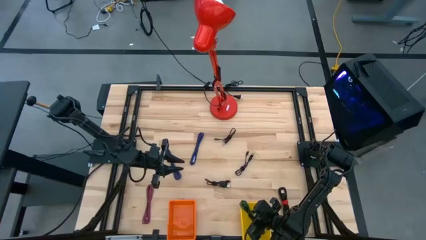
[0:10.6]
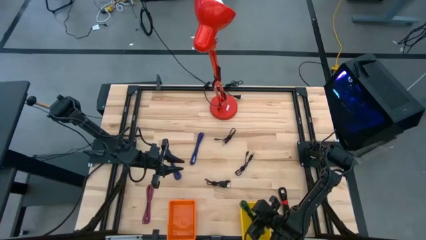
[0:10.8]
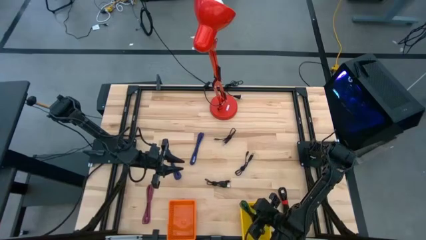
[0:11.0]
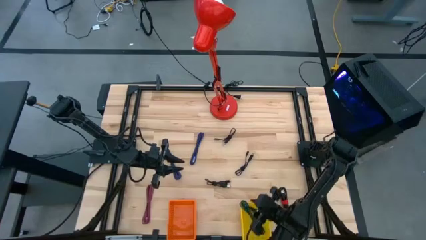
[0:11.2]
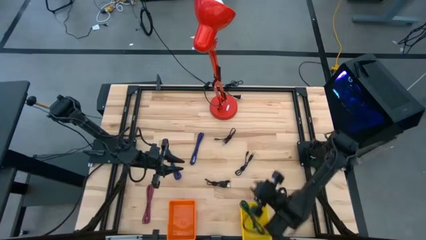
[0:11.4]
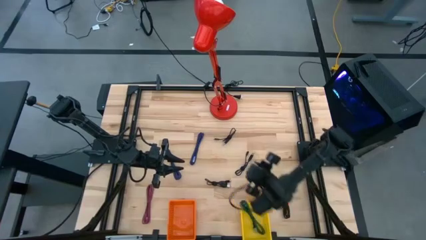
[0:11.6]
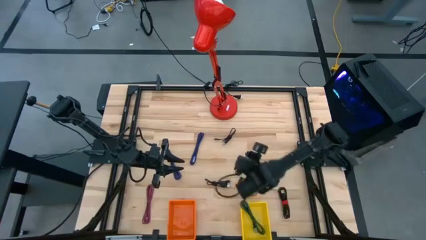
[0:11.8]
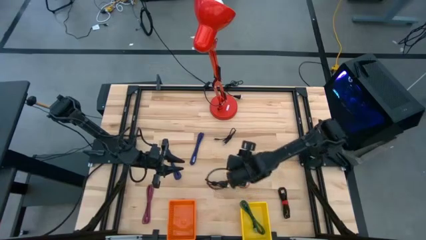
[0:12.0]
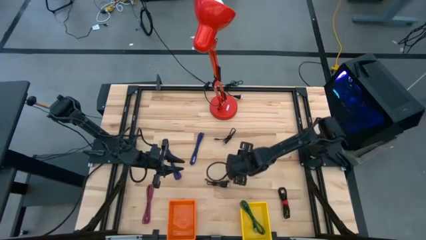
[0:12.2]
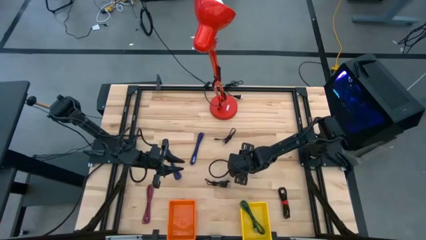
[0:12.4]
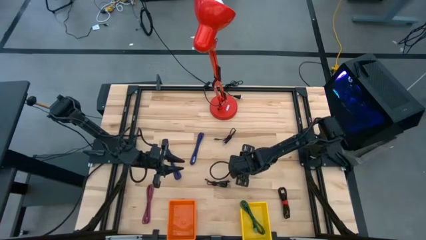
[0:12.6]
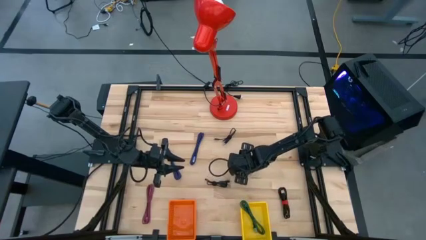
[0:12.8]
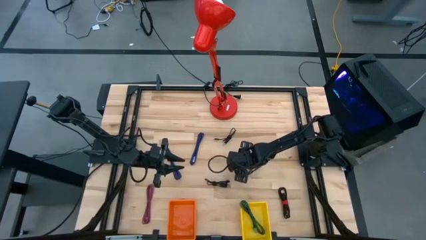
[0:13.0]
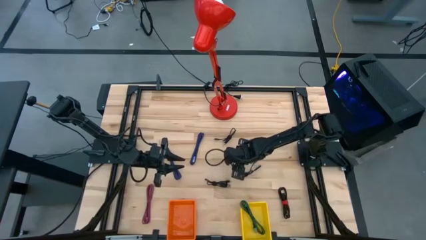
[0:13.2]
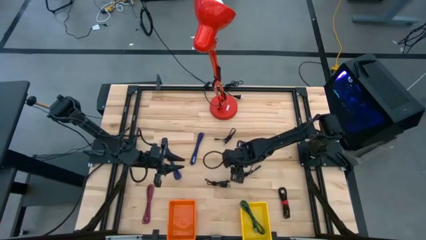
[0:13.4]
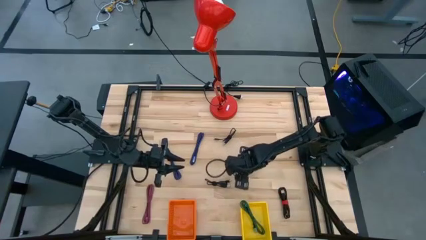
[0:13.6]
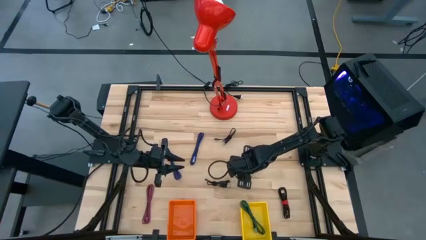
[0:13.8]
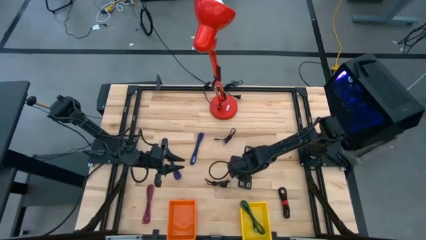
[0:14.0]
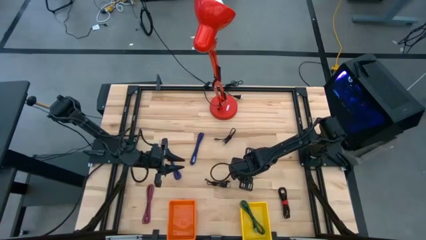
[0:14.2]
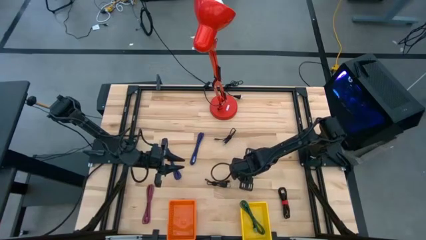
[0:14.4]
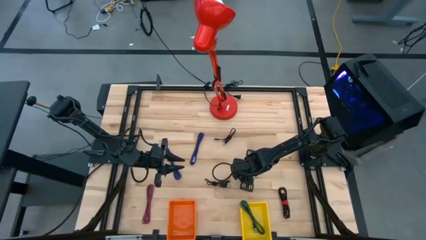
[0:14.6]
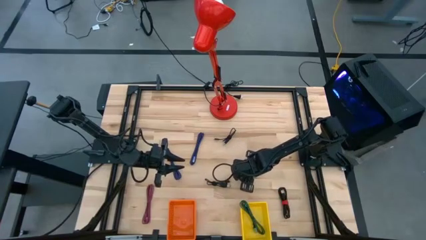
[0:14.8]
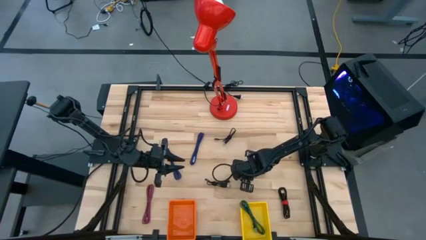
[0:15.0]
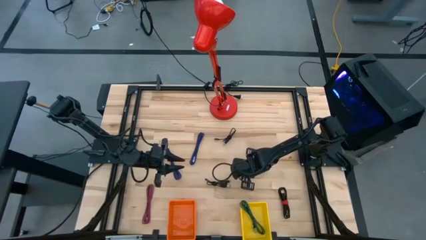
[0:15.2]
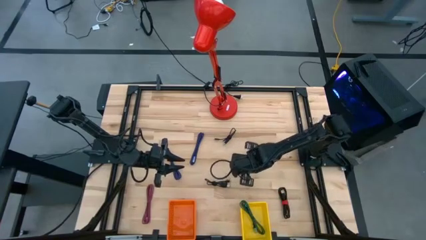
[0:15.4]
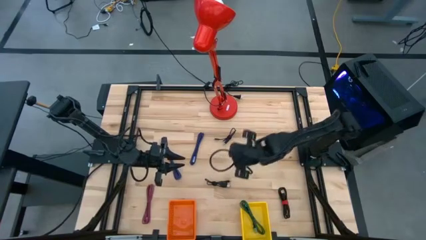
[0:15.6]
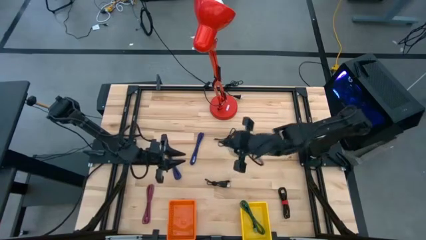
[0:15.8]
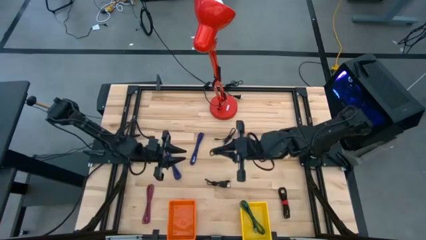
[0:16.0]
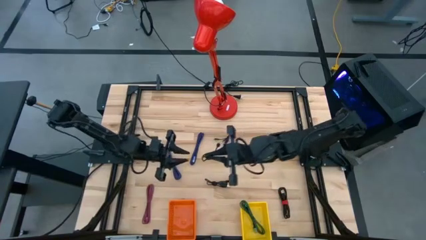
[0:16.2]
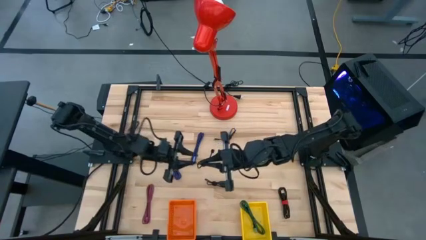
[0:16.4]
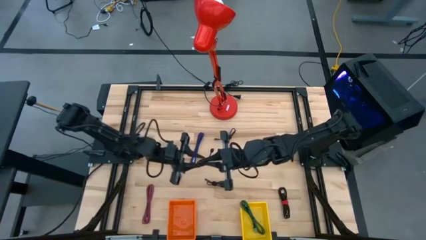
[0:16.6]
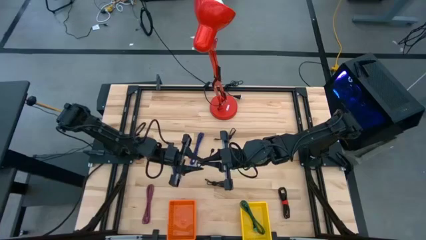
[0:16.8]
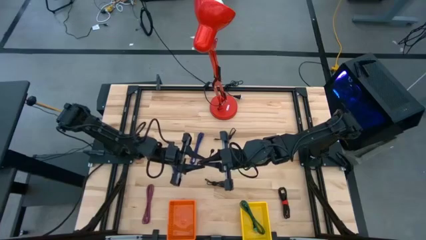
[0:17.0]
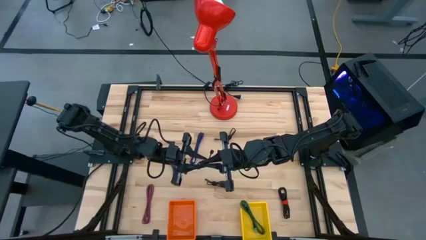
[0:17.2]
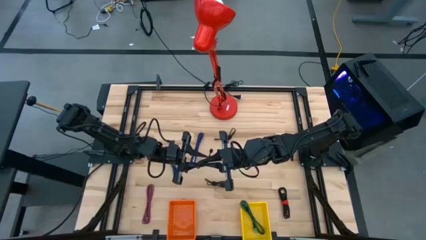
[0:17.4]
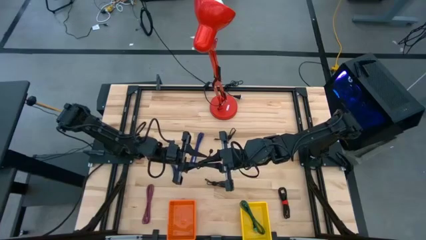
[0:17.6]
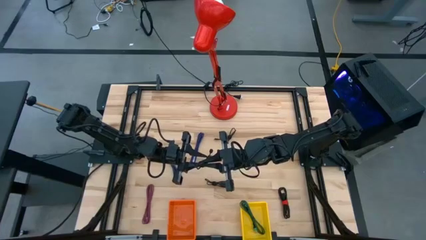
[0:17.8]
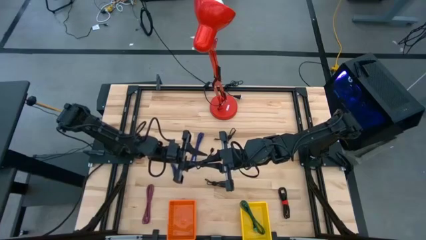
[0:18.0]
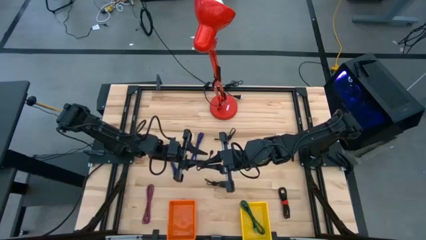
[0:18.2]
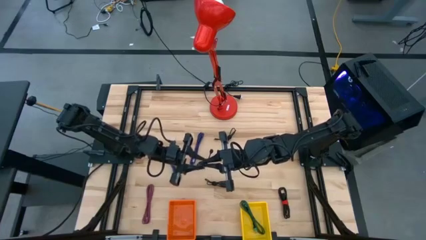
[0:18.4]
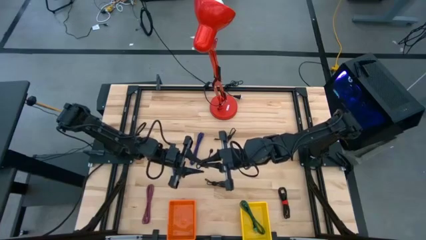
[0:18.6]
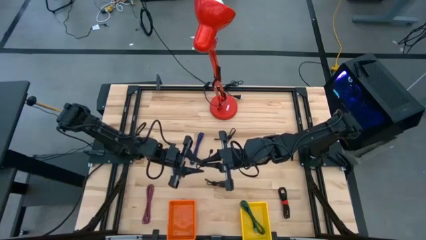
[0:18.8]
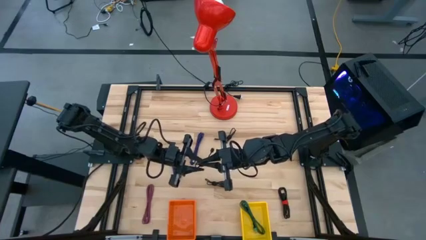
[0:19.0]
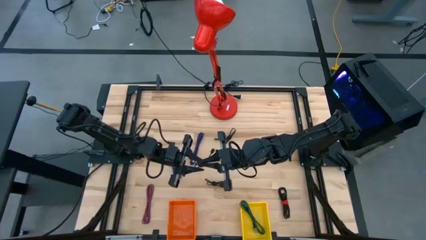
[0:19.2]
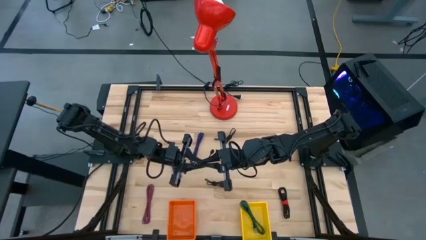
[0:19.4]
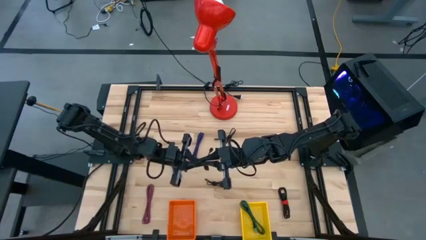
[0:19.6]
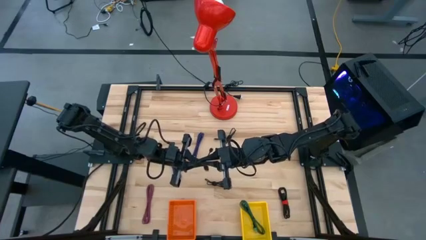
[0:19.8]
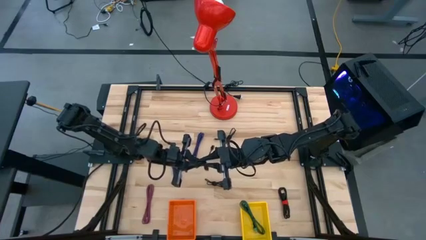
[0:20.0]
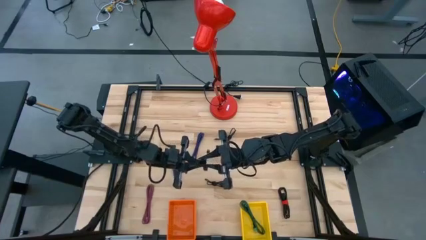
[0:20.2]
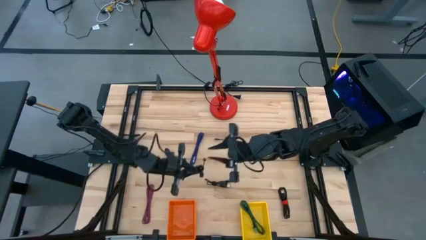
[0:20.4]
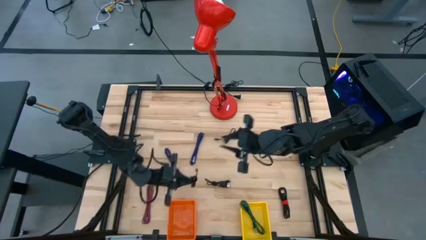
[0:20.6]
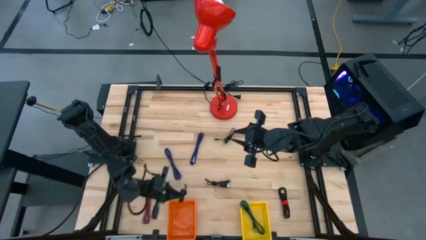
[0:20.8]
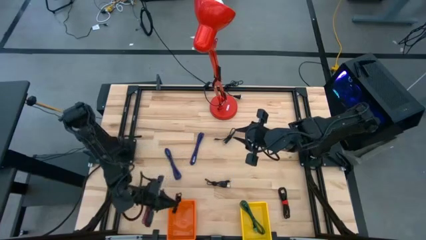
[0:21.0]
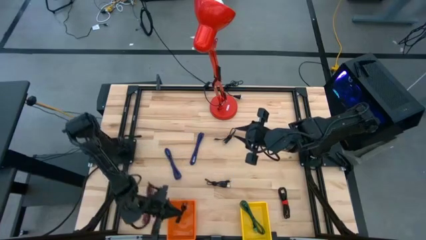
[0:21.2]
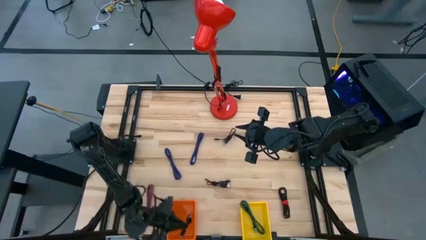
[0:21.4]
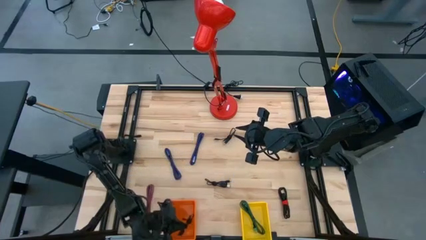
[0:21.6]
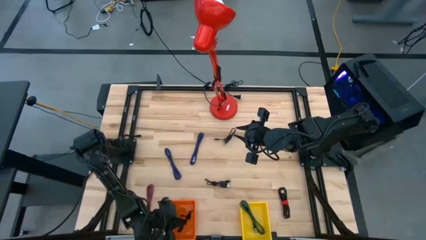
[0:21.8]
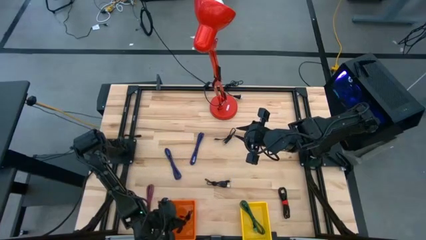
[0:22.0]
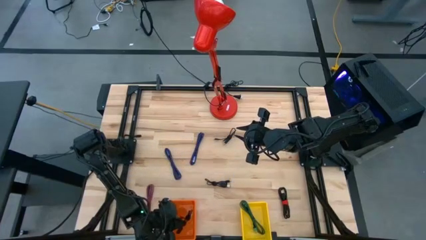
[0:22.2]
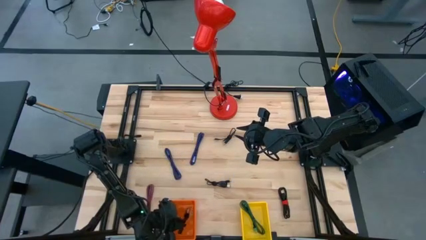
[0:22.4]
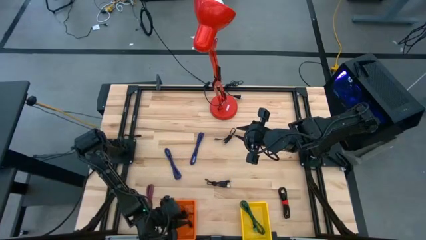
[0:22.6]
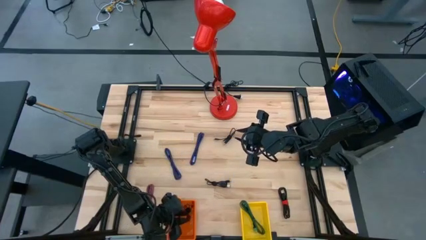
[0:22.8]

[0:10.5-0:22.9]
Task: Pick & Place USB Port
Put the black charger cable into the orange bin

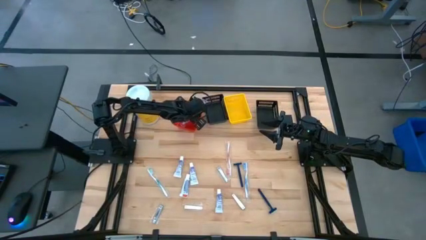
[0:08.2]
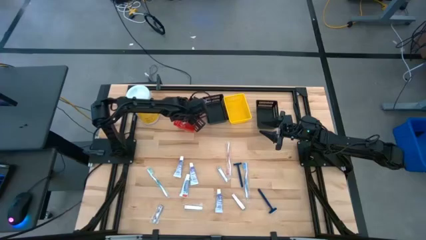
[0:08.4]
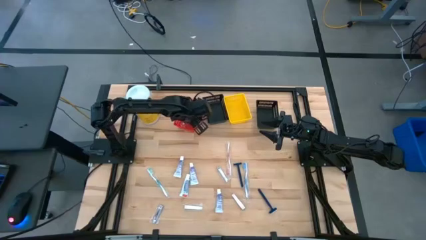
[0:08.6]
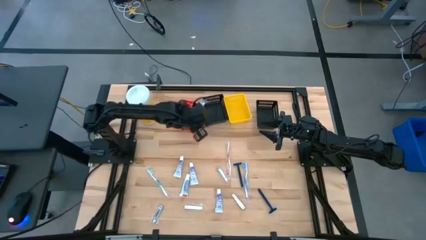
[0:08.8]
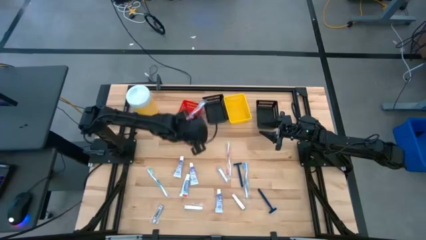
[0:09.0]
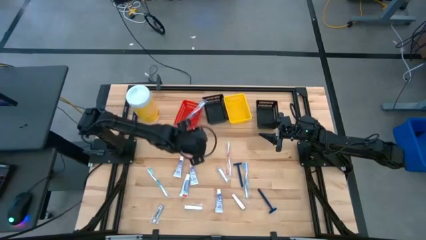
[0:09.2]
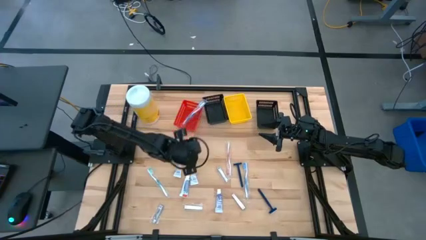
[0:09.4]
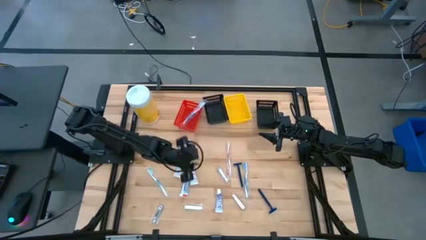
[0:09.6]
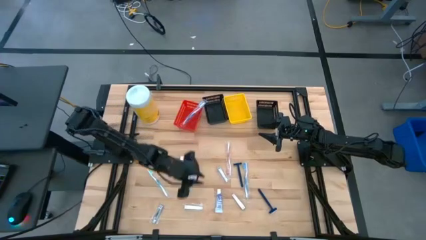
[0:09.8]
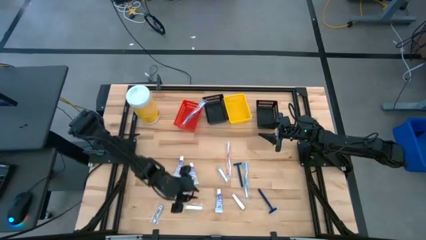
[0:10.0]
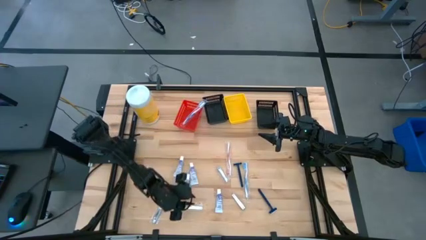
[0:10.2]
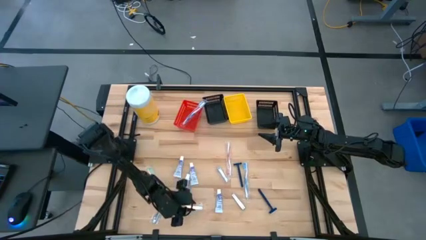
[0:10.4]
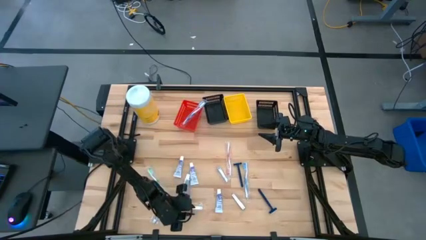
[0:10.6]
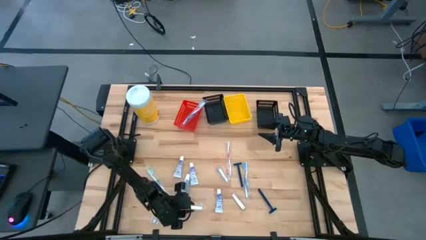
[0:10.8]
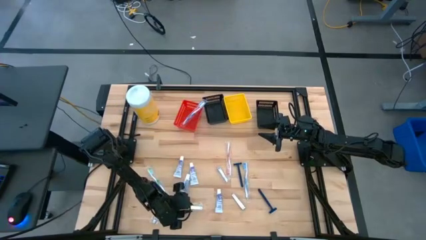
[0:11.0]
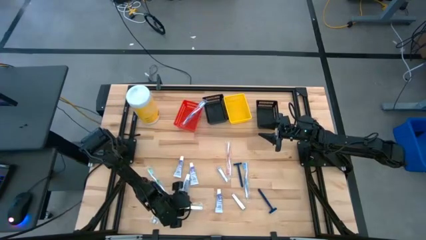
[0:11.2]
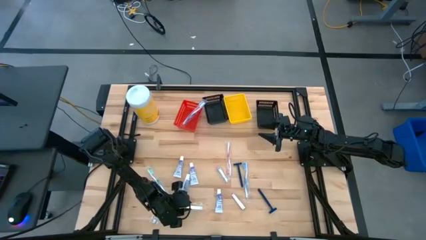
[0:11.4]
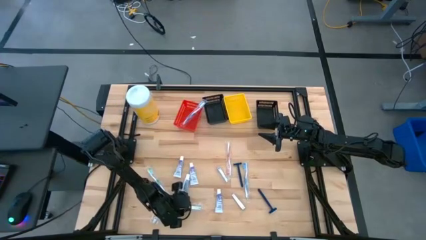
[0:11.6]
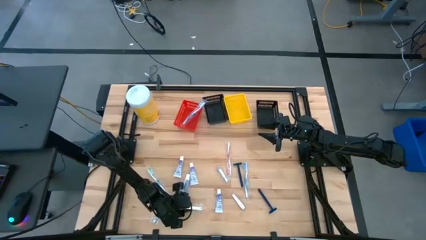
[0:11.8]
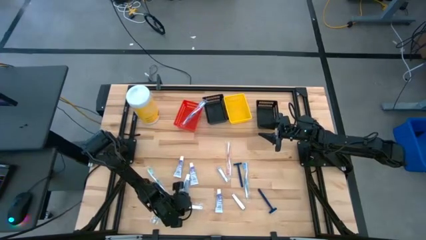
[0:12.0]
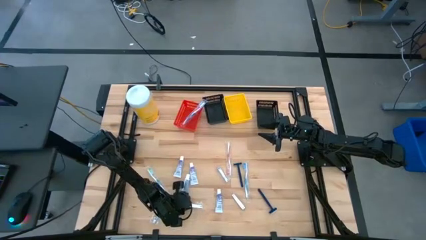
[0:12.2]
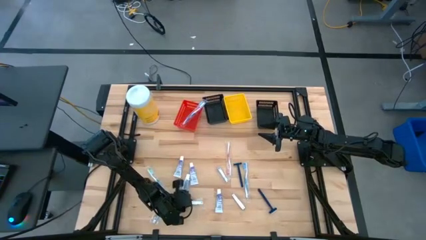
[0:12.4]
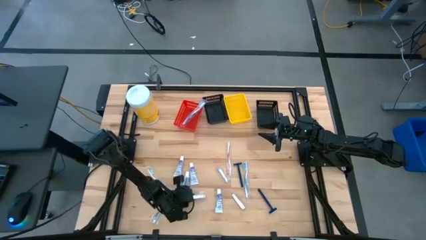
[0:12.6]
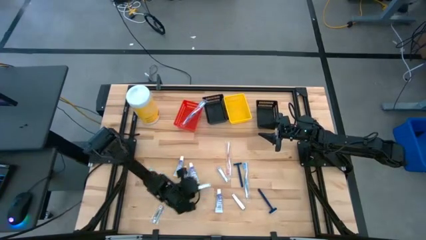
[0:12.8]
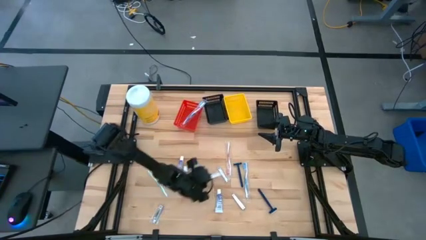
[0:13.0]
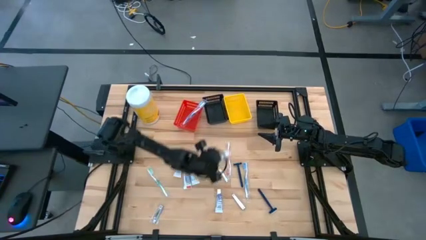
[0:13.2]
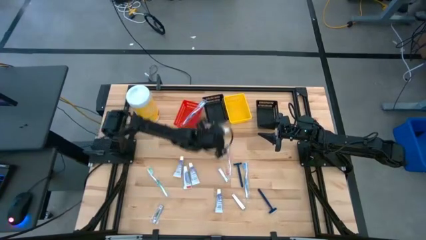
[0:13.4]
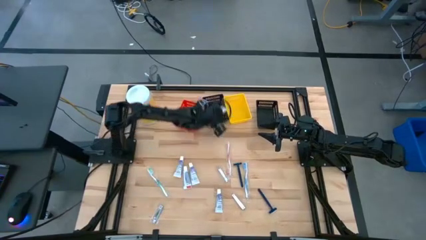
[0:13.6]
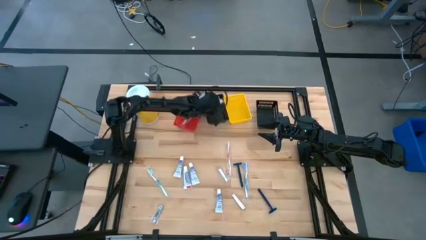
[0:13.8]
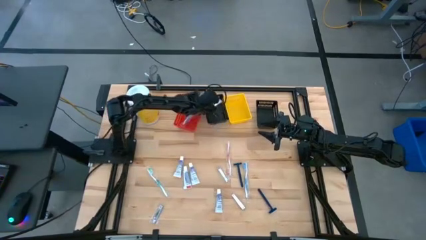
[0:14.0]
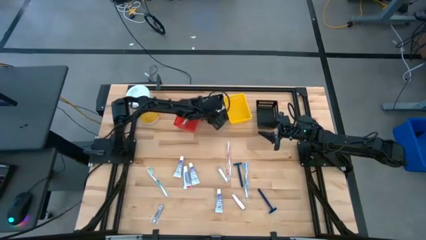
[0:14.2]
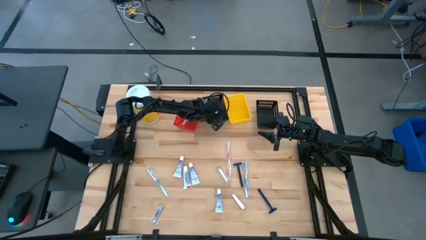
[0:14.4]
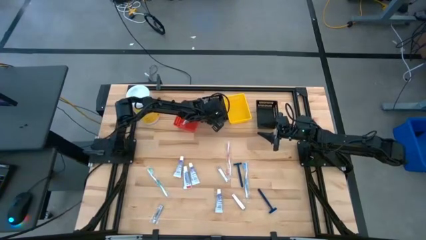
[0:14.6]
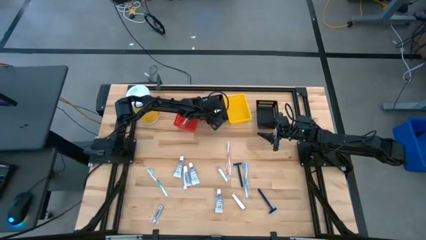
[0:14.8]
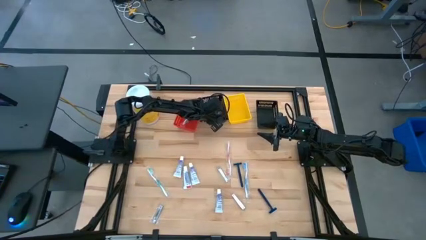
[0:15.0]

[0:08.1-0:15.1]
Task: Pick & Place Travel size toiletries
Put the silver nail cutter into the left black bin
